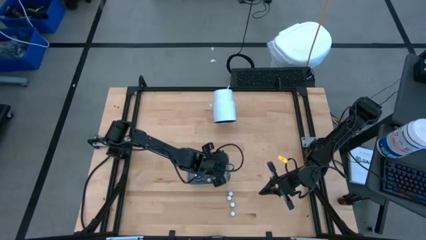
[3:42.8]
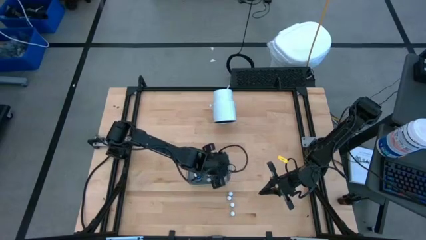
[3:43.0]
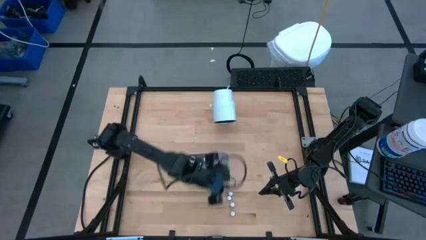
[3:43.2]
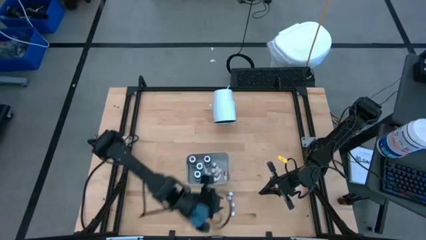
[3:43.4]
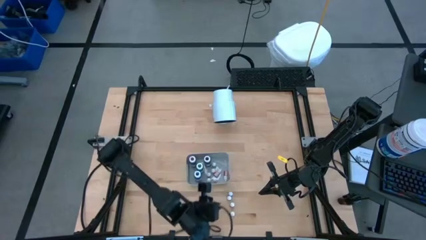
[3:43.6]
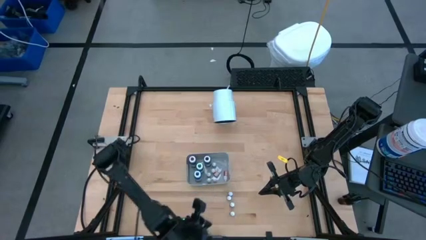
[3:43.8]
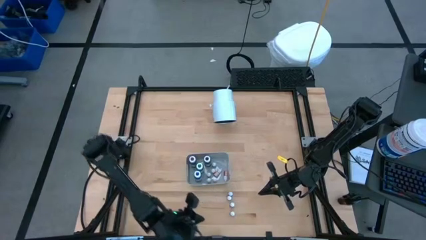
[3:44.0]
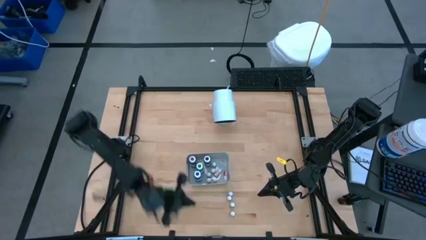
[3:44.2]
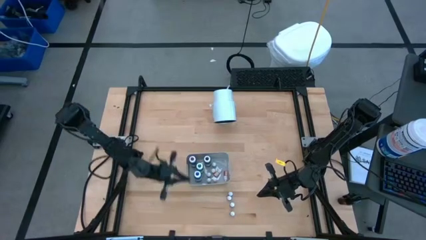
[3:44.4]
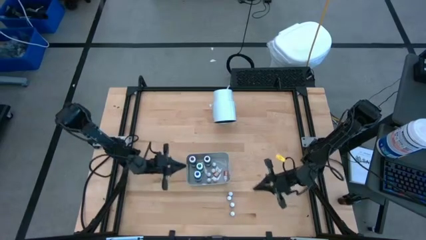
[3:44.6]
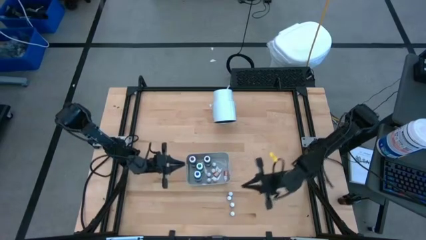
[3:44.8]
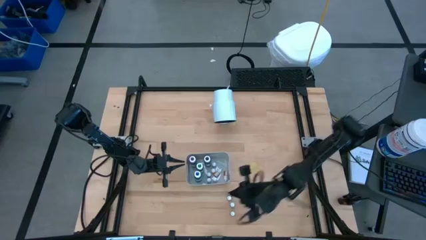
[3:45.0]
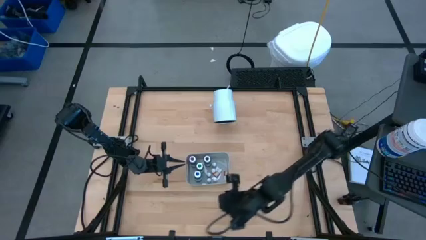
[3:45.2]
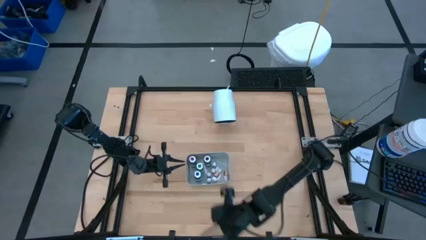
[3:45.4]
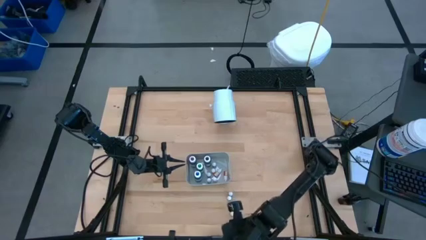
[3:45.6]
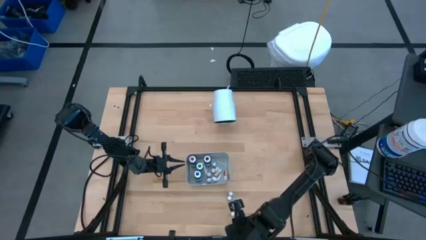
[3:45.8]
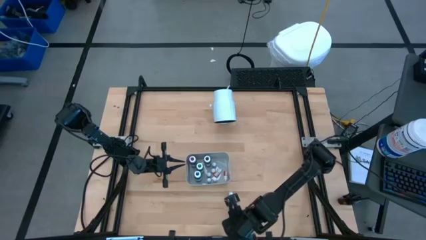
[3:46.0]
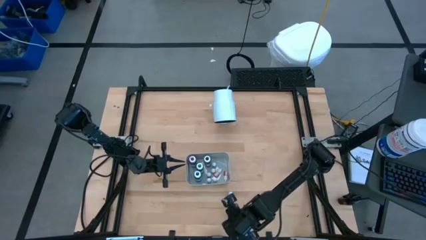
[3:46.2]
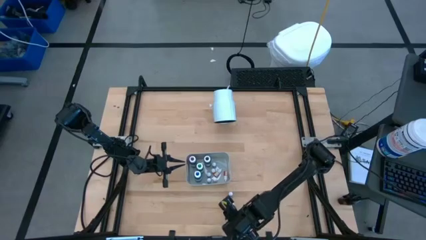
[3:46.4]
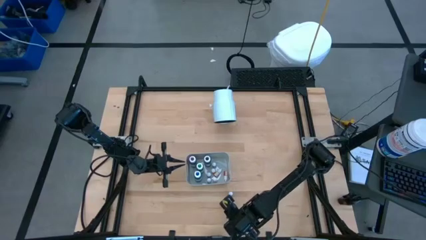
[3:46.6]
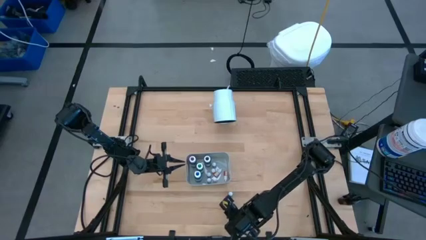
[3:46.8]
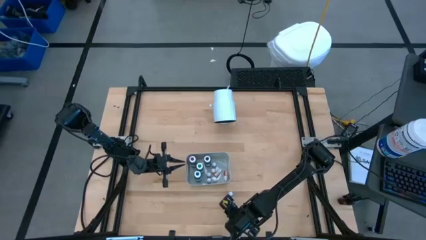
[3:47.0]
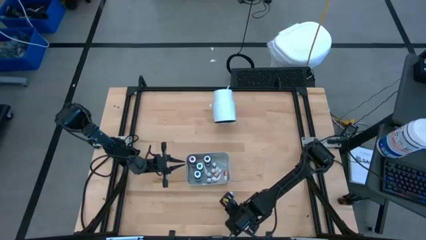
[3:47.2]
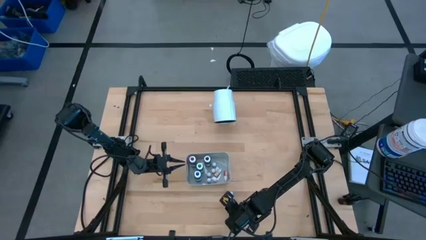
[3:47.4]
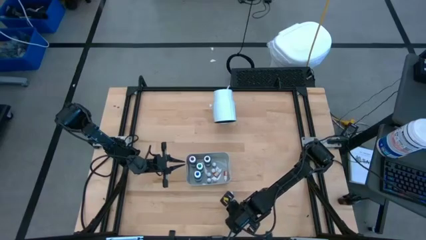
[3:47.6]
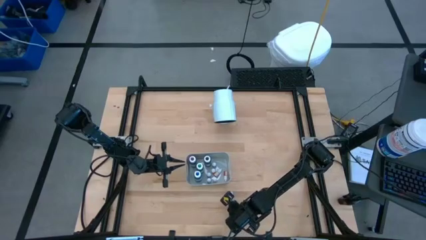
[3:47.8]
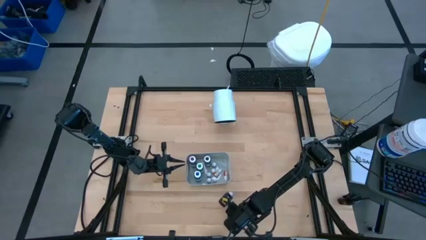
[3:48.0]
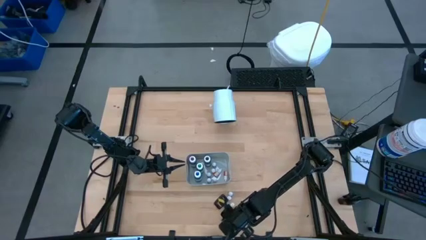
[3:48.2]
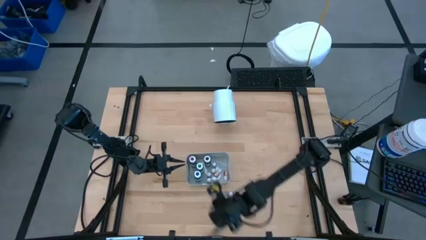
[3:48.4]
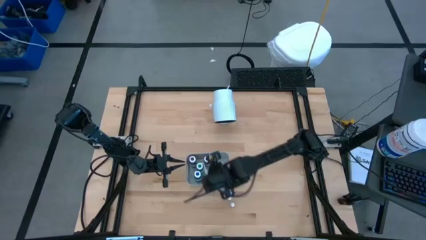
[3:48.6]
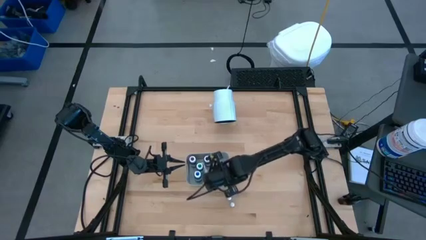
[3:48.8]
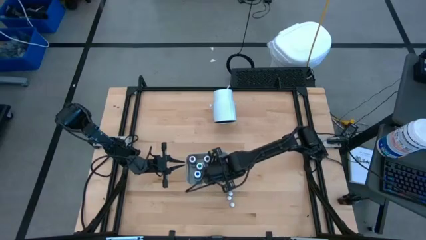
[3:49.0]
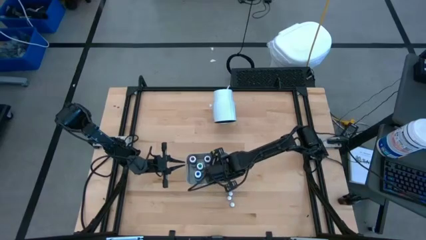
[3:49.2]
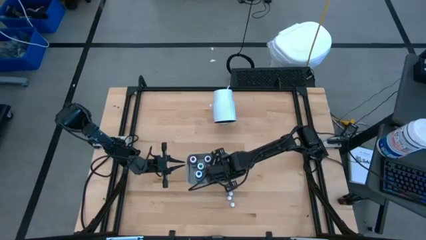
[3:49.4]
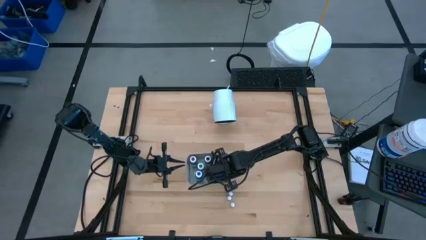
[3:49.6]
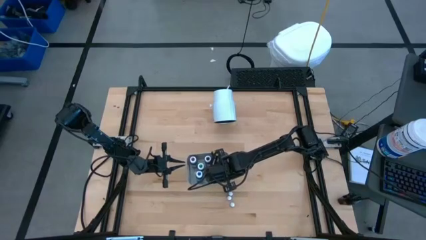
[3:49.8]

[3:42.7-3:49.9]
Task: Pick & Place food coloring
Put the small blue food coloring bottle into the gray bin

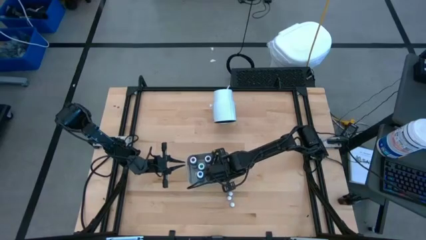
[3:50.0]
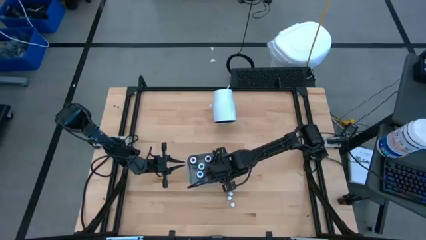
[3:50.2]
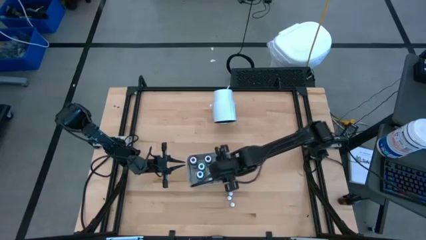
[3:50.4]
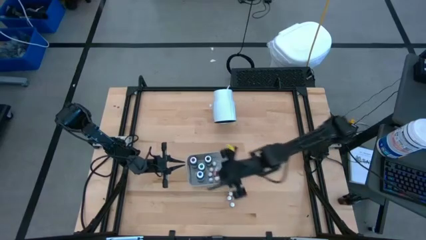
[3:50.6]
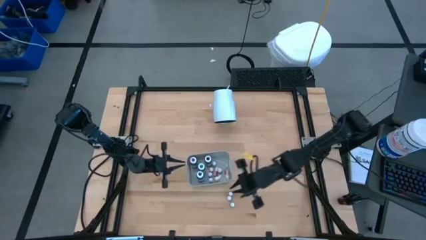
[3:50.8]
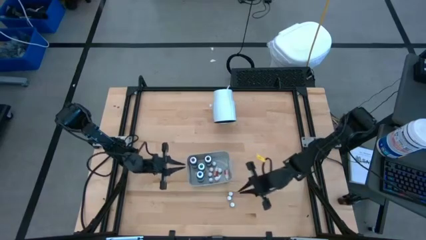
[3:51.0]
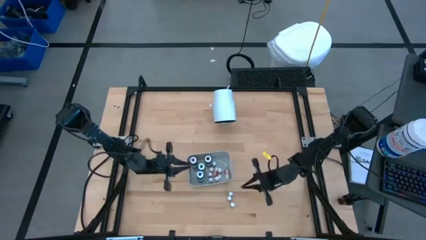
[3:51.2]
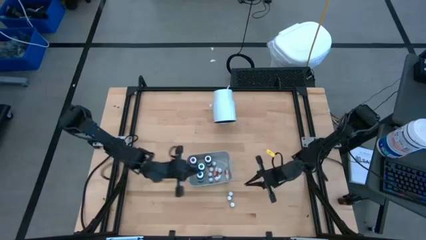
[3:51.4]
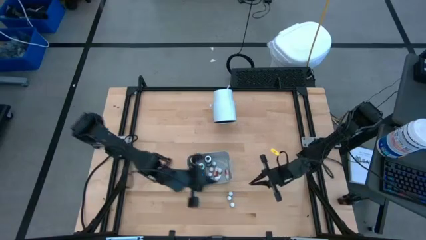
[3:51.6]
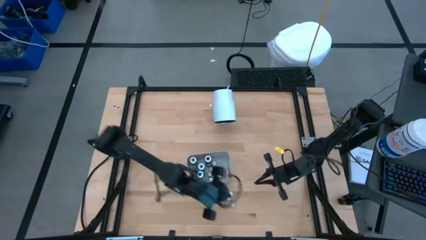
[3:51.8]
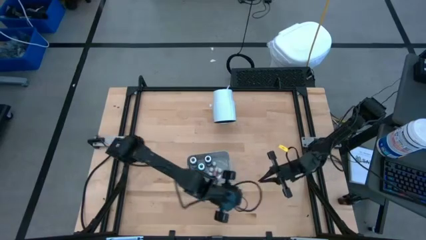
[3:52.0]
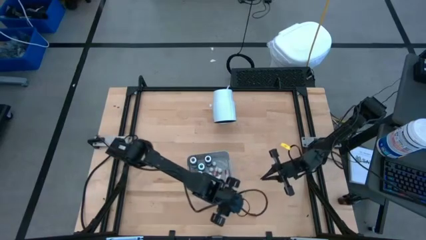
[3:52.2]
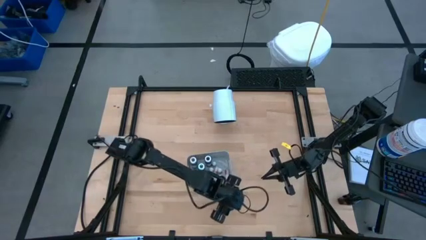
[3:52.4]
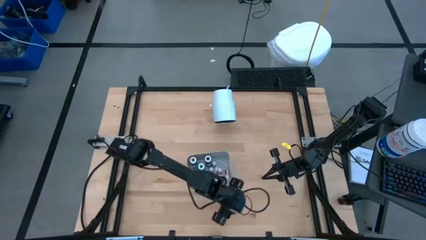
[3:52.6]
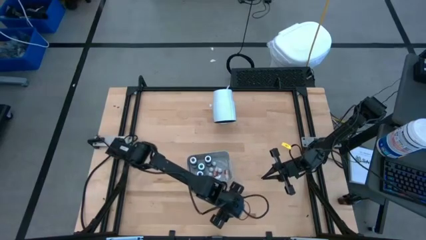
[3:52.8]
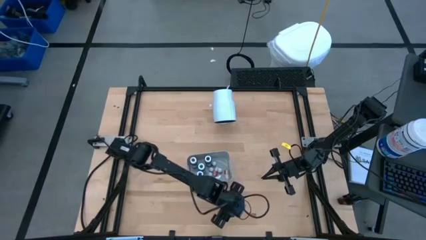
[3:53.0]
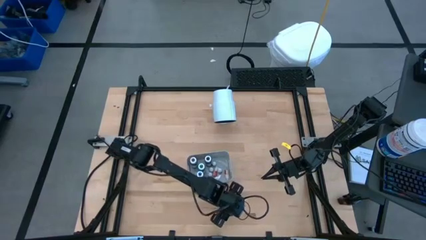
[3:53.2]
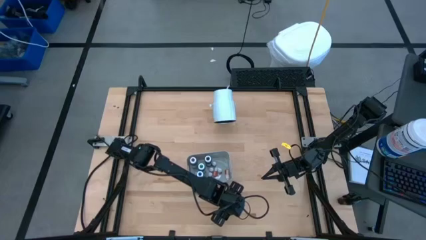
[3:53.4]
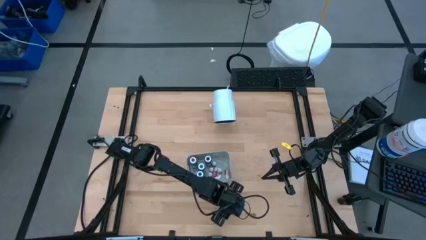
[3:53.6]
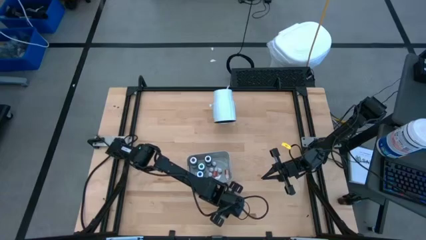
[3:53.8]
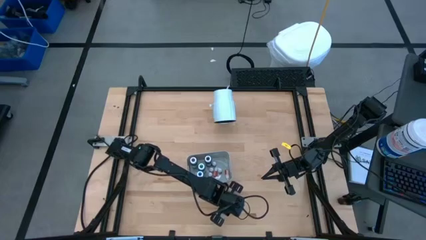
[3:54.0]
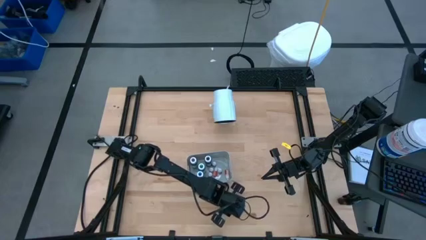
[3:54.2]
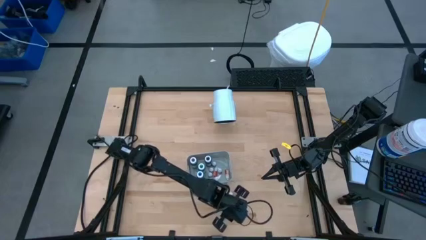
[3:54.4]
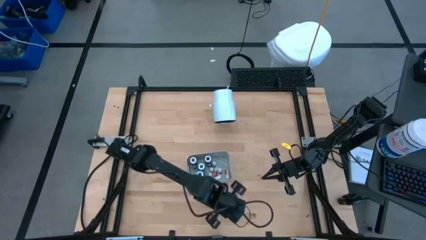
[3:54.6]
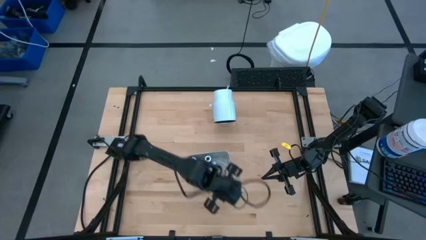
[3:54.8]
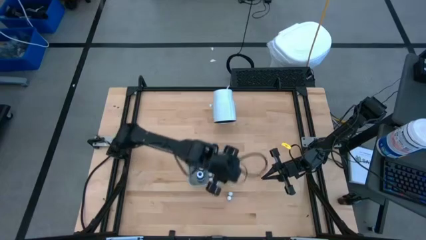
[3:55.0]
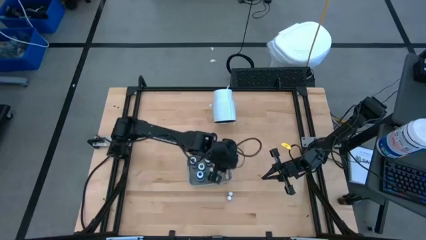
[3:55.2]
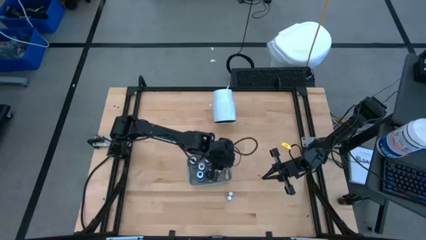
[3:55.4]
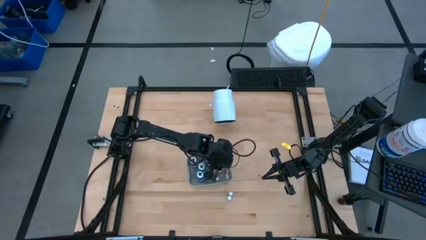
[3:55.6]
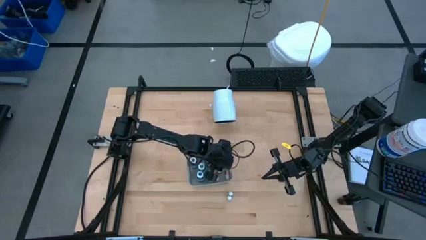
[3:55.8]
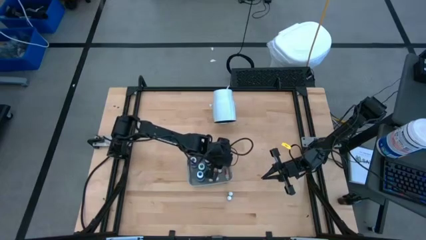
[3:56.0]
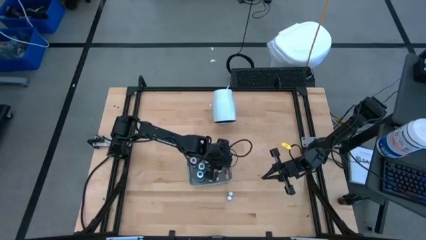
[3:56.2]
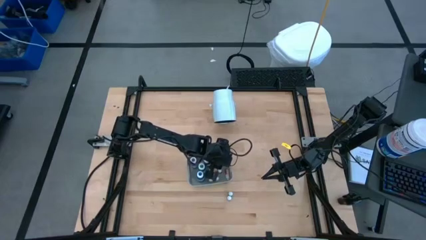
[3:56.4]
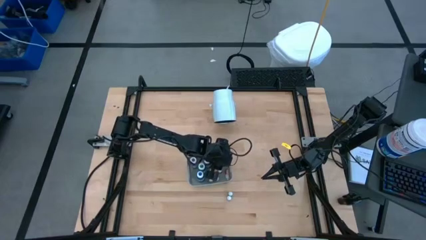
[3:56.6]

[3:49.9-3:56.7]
Put the small purple food coloring bottle into the gray bin
